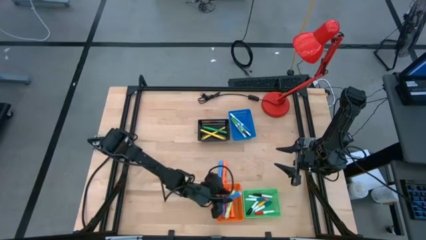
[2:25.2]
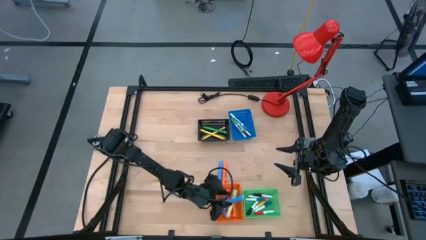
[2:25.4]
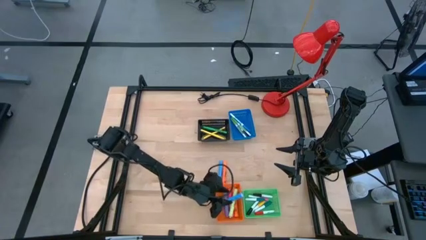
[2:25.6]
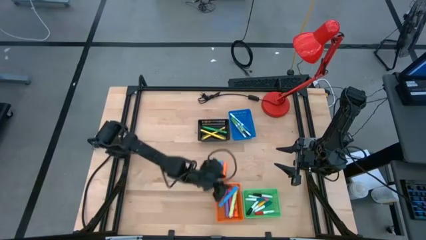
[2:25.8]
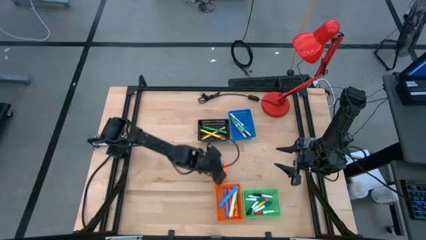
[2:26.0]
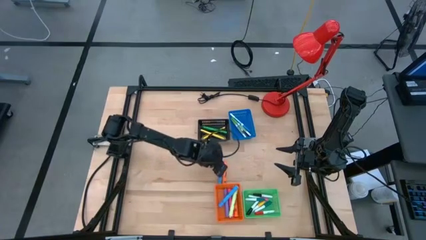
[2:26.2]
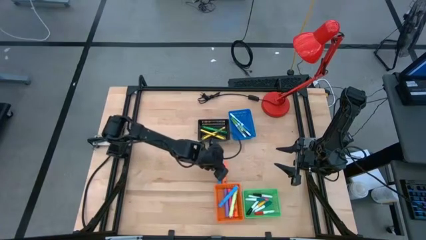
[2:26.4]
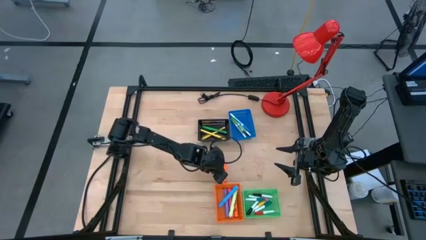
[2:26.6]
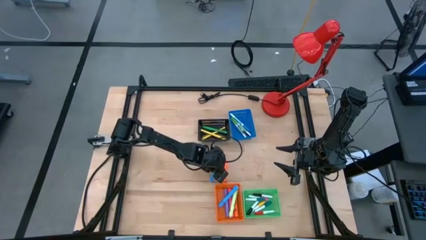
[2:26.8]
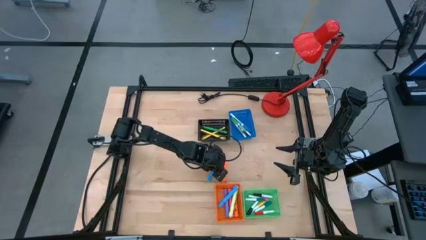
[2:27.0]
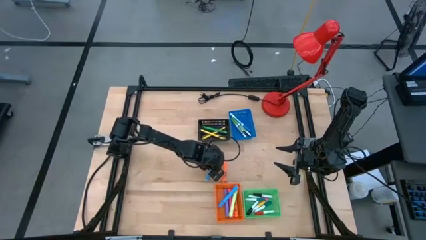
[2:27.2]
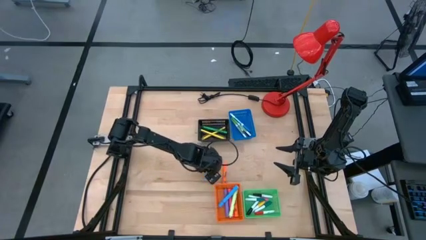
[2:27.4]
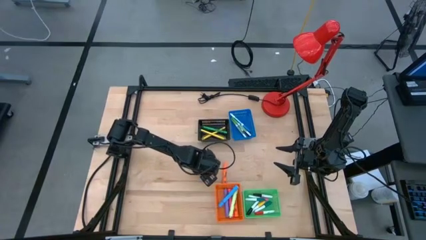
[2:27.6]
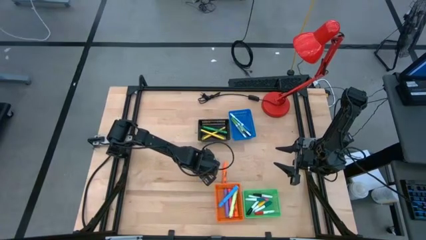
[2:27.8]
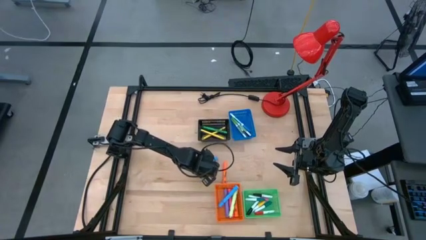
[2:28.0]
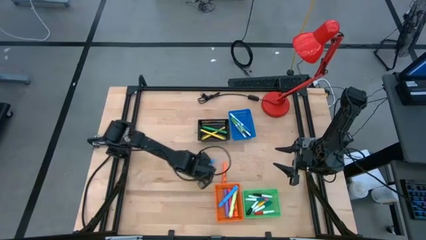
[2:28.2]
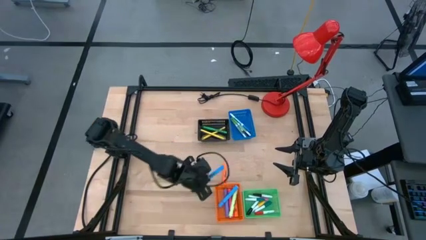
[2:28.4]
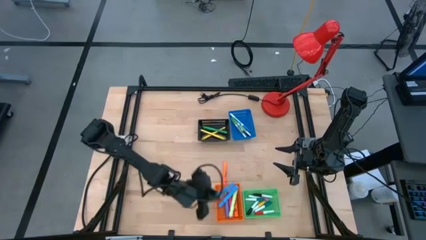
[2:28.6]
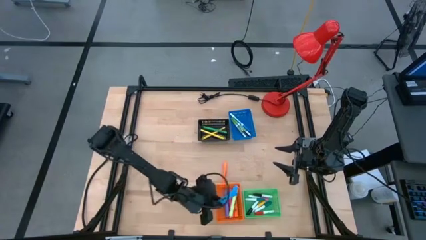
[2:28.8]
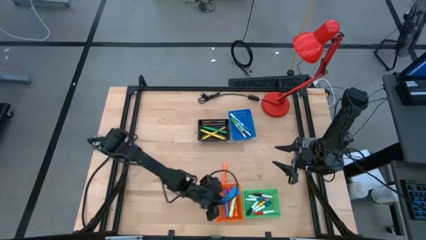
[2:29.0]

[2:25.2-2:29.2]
Task: Pick & Place Markers
Put the blue highlighter pen into the orange bin

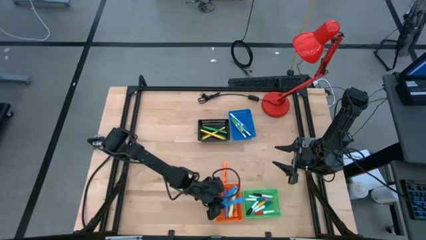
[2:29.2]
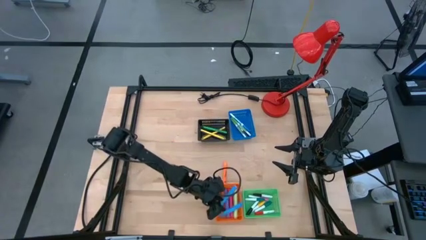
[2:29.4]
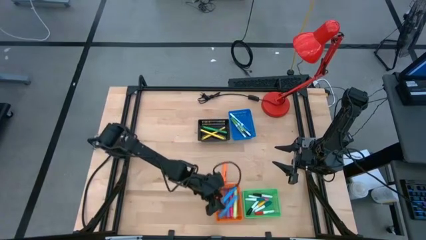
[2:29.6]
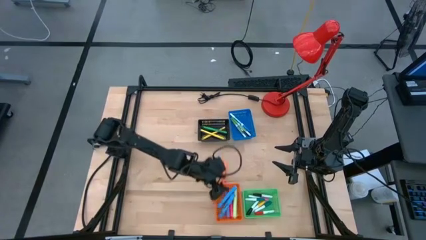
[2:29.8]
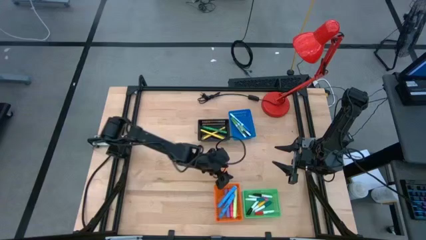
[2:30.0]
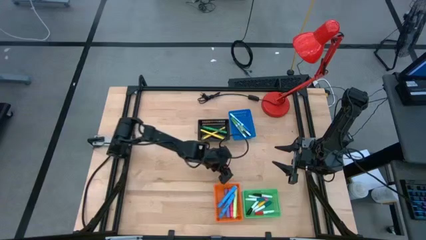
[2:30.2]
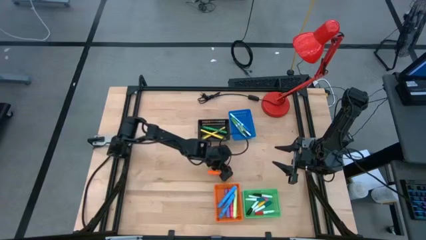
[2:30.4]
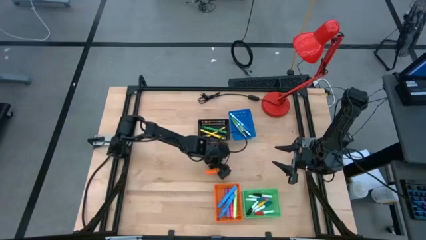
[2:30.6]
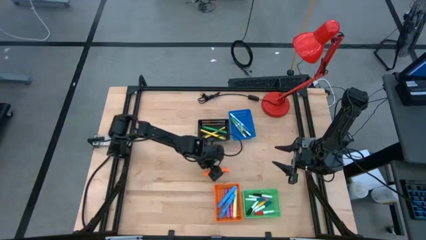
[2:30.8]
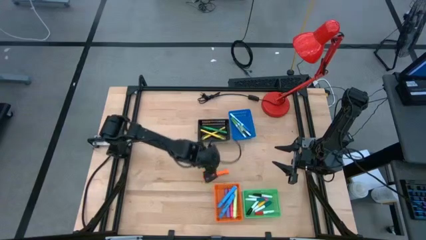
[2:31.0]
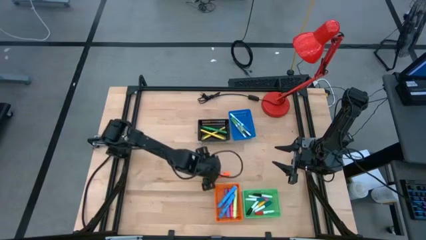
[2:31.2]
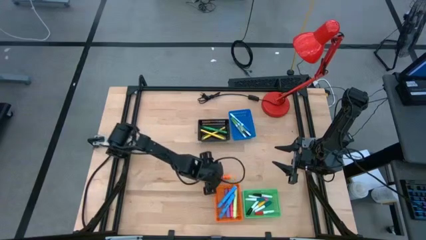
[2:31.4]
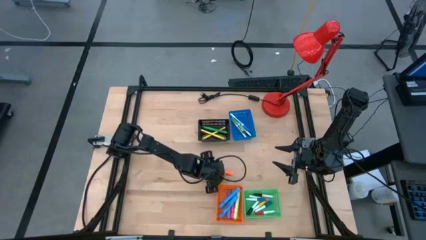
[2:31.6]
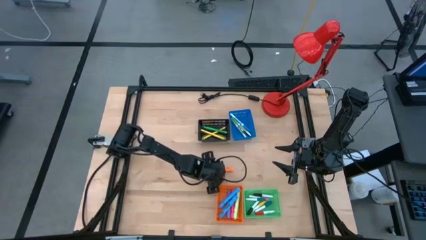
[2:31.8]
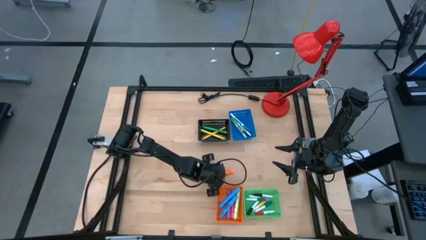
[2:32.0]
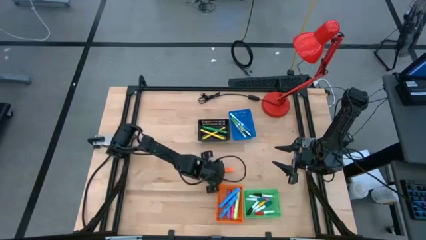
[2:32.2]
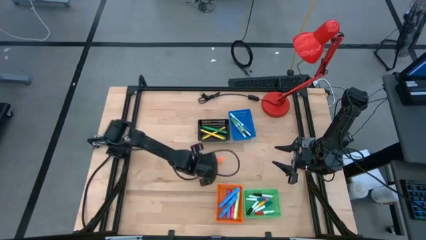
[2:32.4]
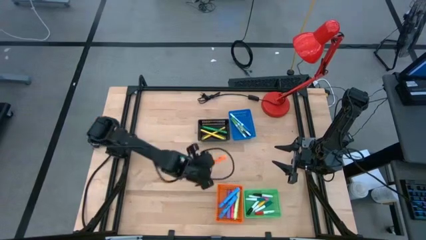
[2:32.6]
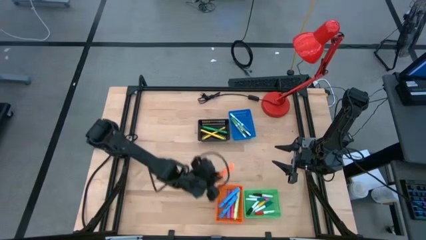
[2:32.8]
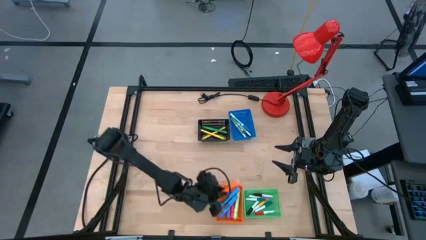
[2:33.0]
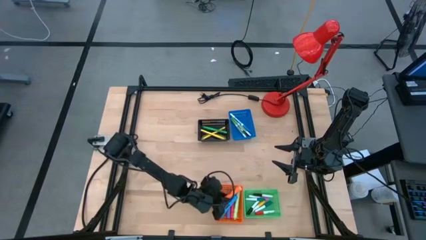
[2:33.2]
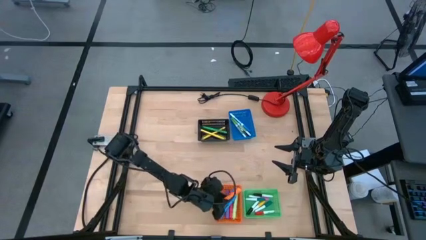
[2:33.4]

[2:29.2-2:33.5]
Put the orange highlighter pen into the orange bin

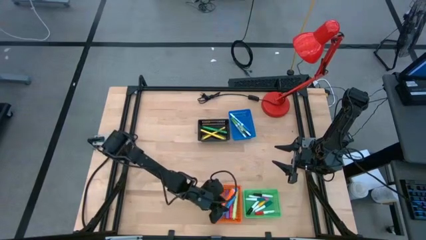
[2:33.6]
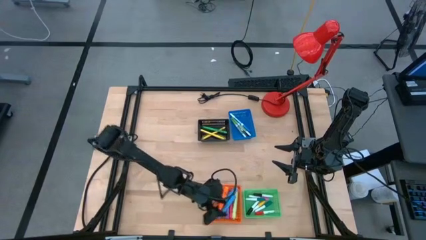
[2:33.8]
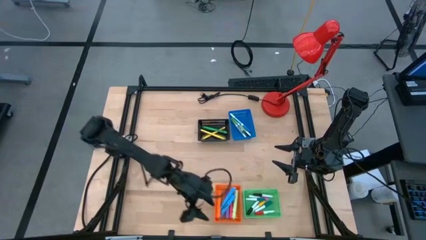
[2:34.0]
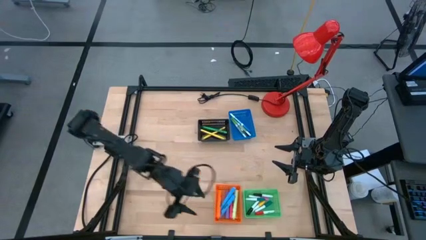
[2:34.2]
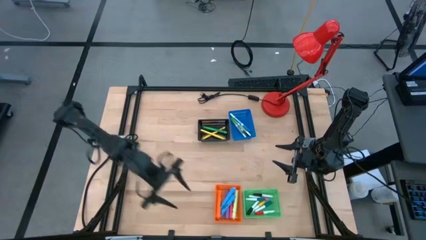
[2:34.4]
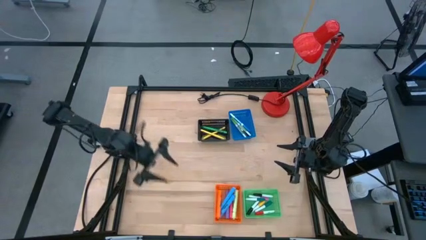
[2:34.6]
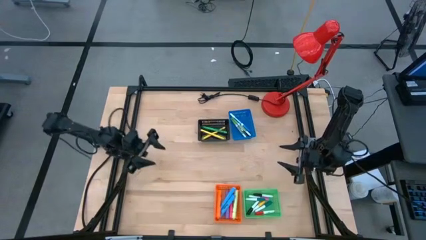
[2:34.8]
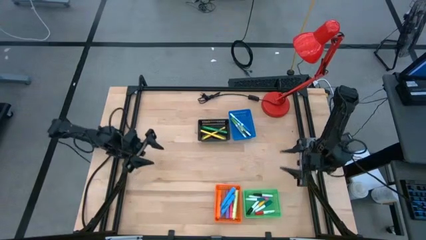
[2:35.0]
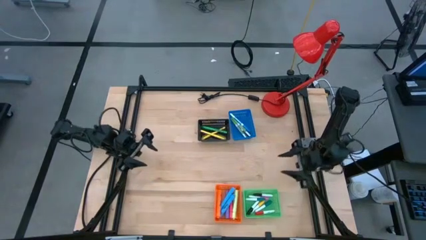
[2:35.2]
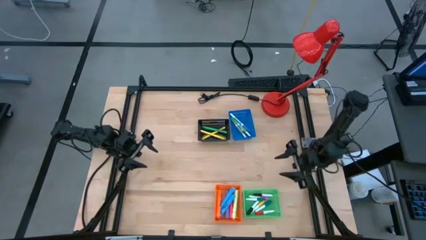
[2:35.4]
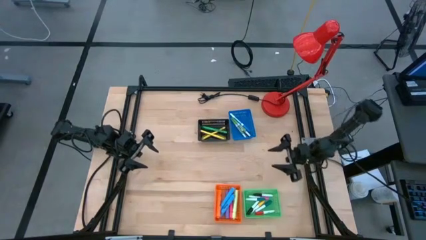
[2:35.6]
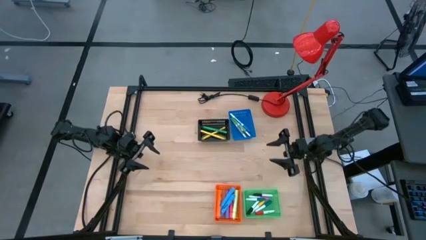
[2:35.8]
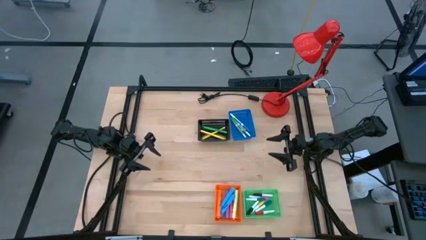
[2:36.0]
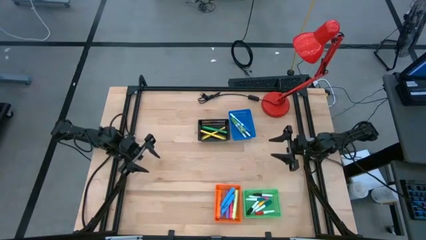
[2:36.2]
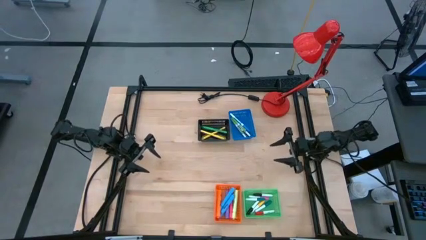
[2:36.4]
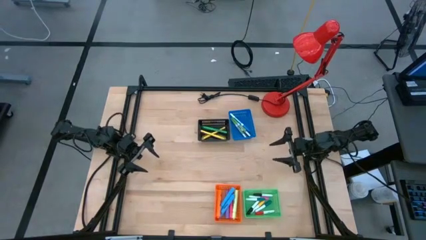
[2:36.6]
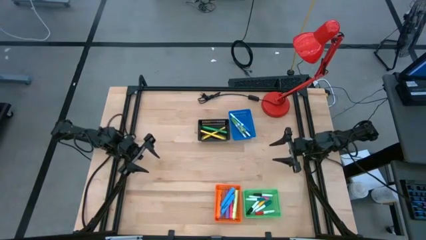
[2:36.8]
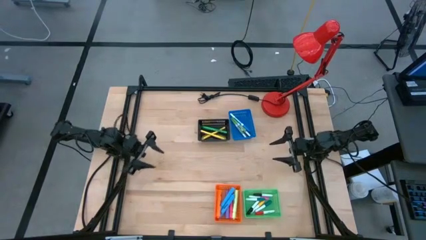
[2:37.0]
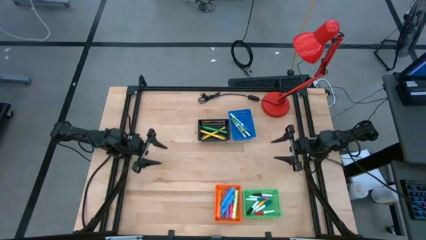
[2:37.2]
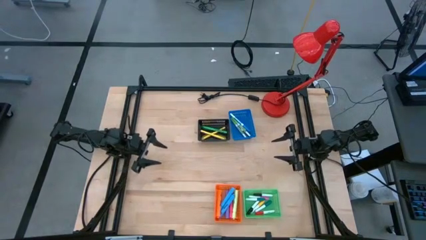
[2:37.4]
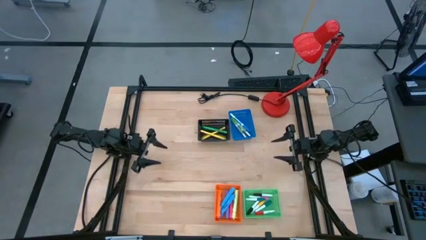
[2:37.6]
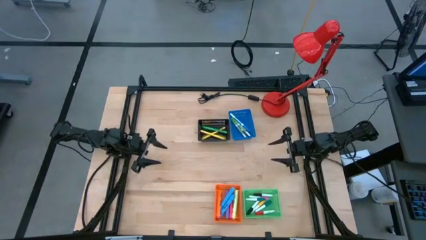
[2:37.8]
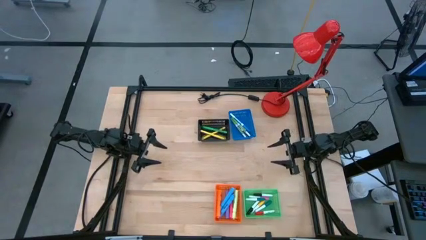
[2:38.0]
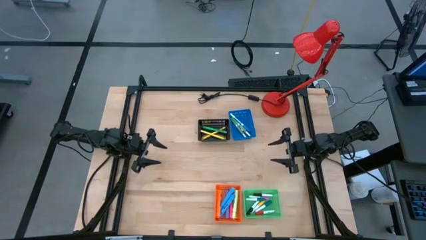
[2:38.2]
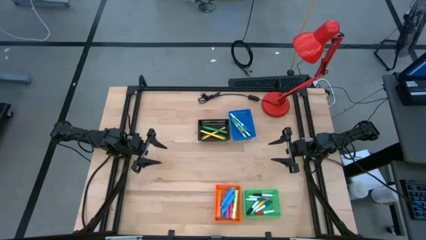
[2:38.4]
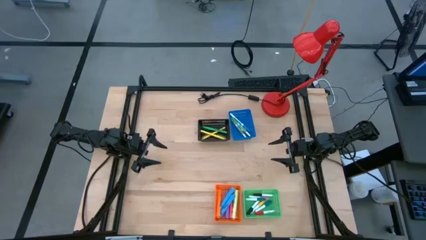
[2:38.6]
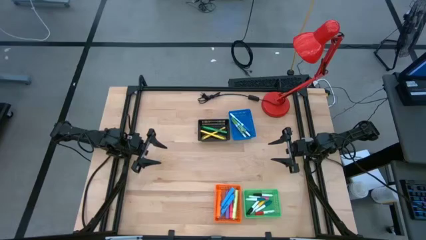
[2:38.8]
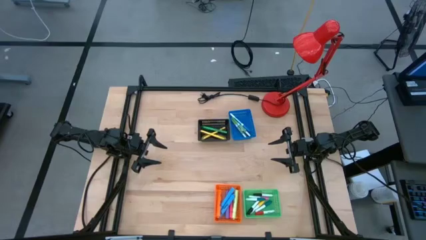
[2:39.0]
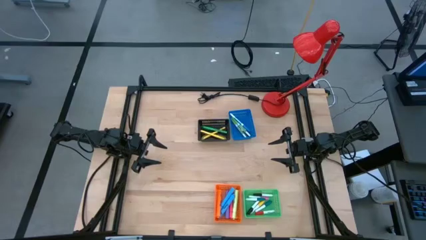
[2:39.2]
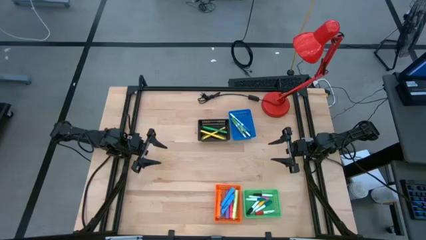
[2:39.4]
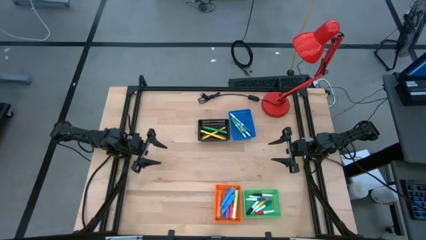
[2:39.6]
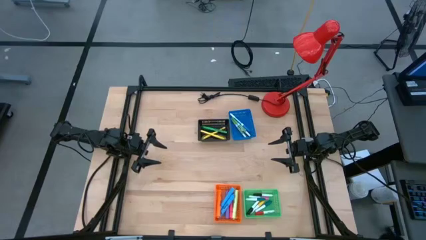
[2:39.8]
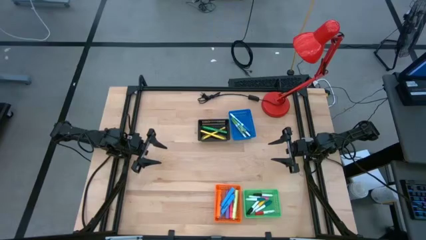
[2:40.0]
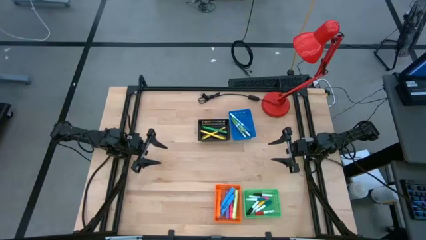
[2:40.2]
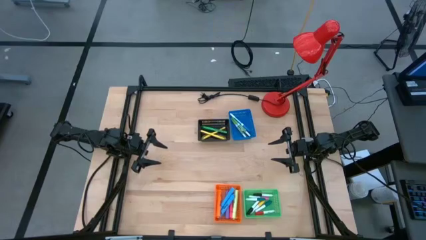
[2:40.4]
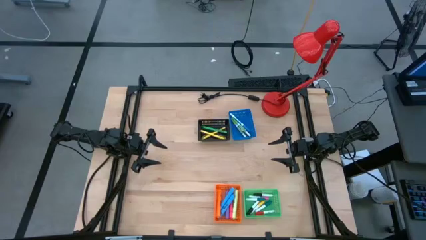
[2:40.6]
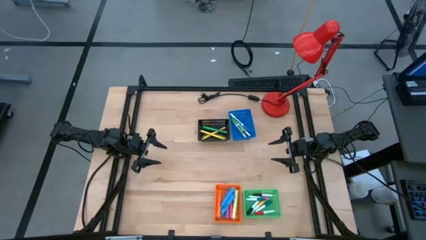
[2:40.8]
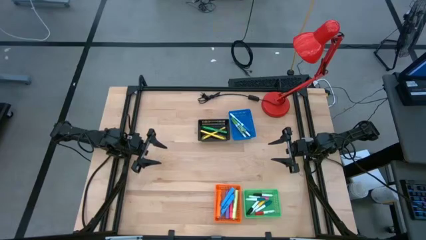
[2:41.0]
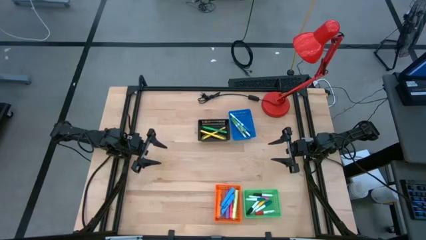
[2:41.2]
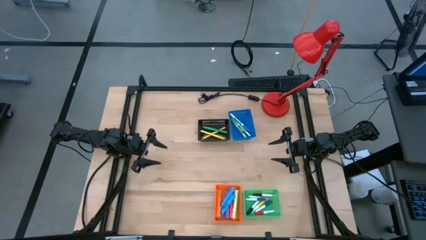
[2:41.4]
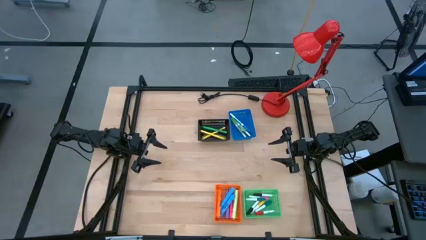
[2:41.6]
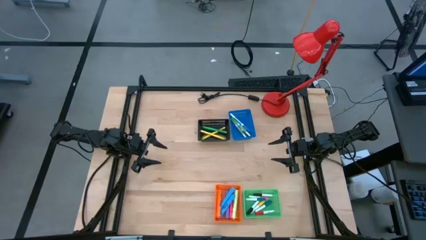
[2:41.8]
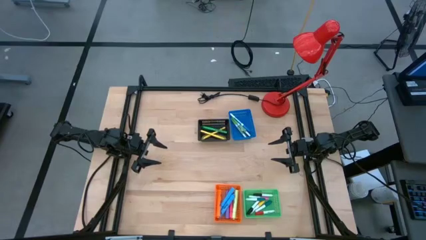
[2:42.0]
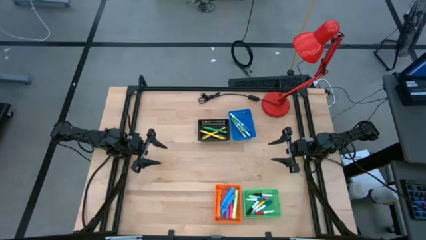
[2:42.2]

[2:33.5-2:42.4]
Return to Home Position
